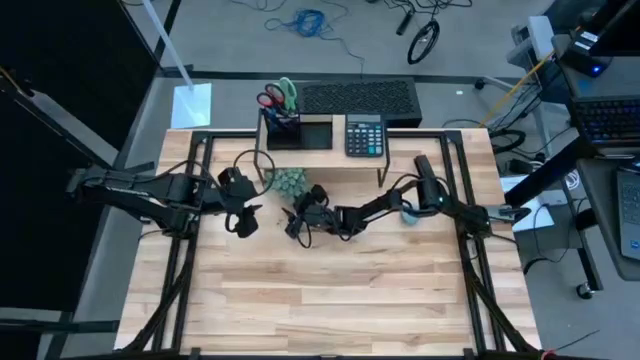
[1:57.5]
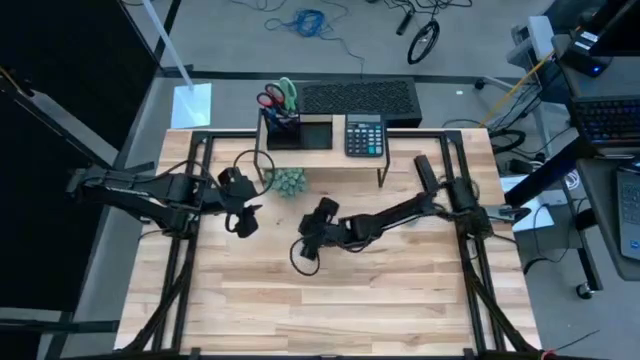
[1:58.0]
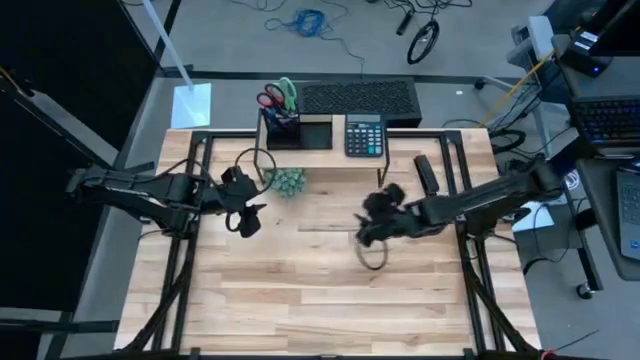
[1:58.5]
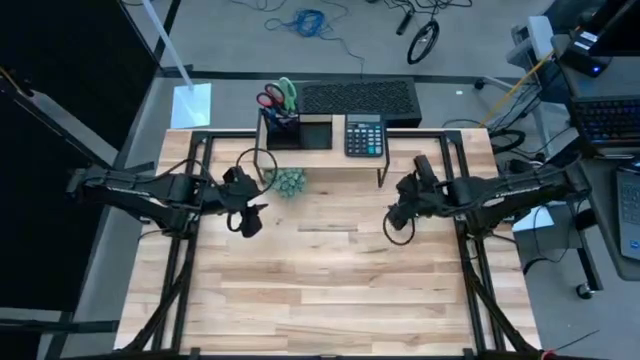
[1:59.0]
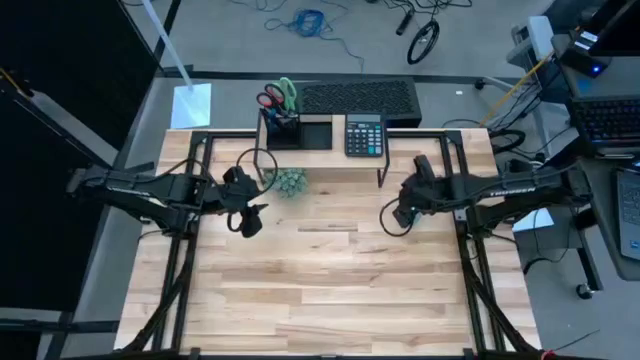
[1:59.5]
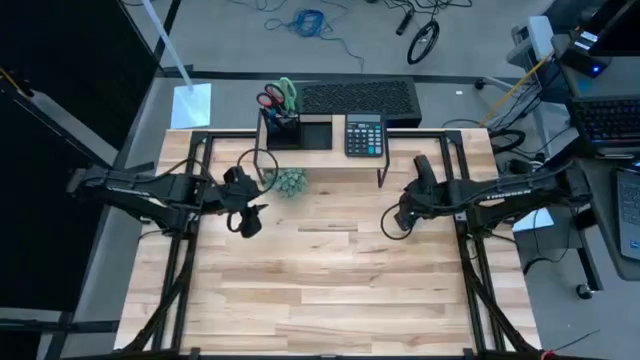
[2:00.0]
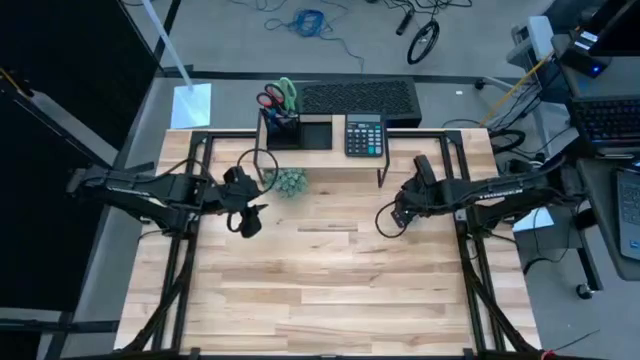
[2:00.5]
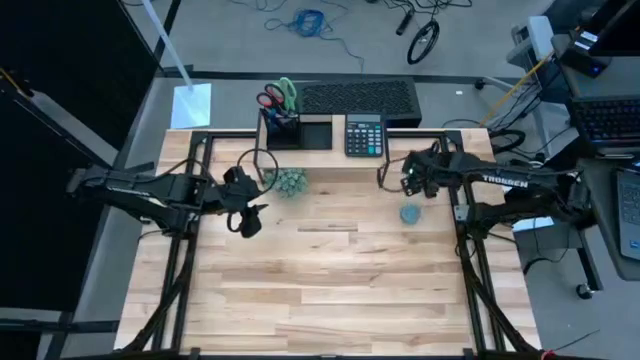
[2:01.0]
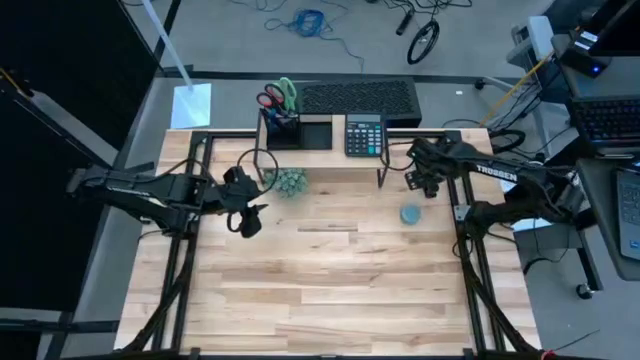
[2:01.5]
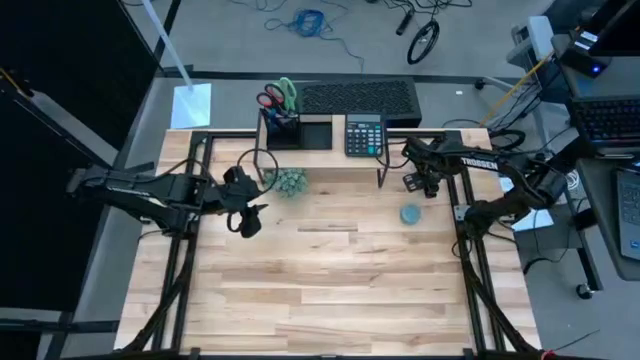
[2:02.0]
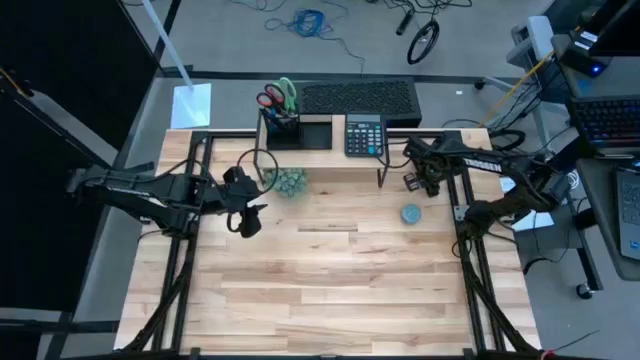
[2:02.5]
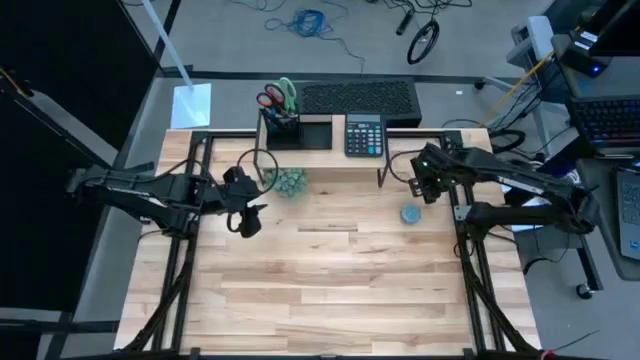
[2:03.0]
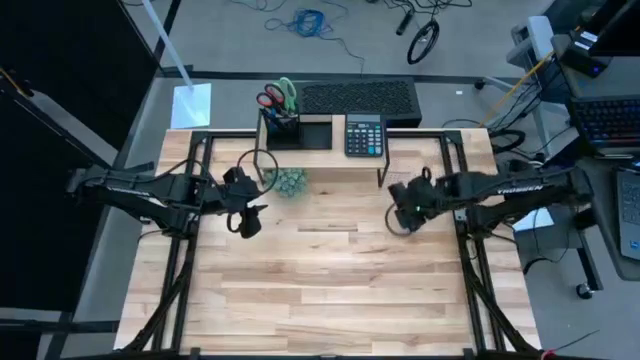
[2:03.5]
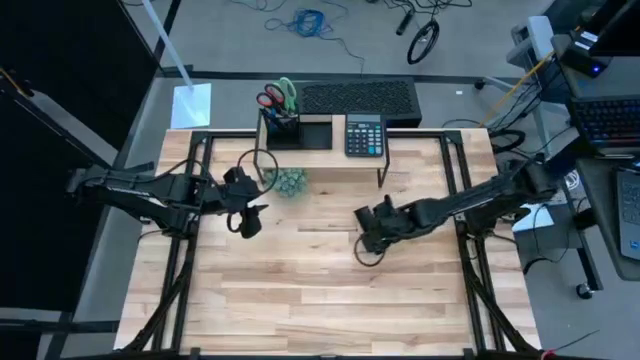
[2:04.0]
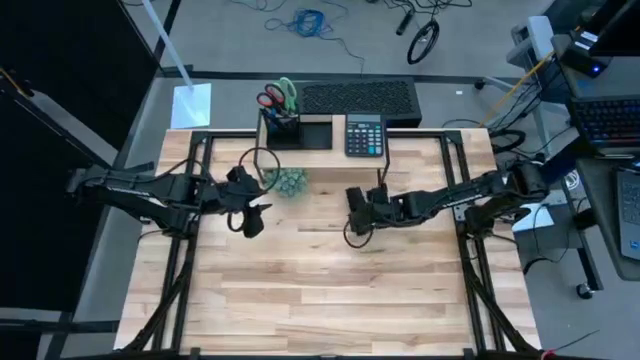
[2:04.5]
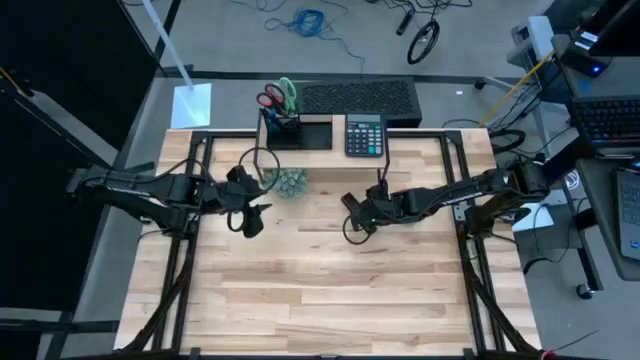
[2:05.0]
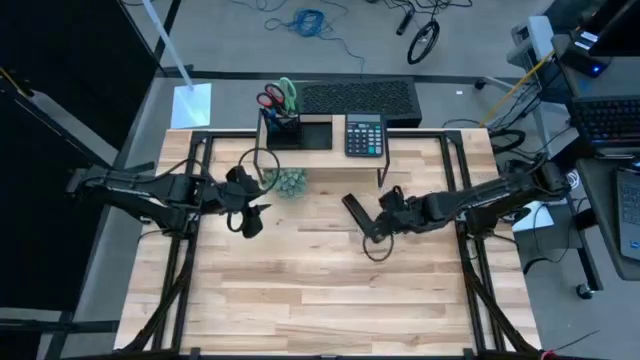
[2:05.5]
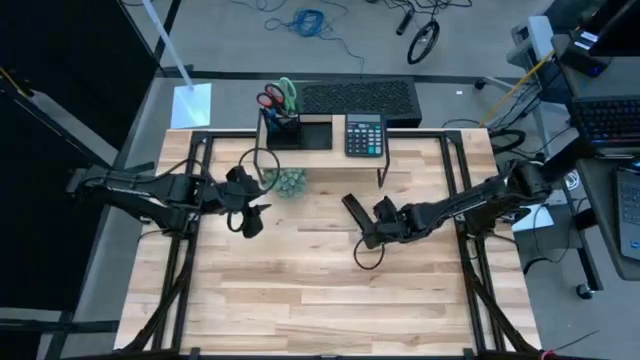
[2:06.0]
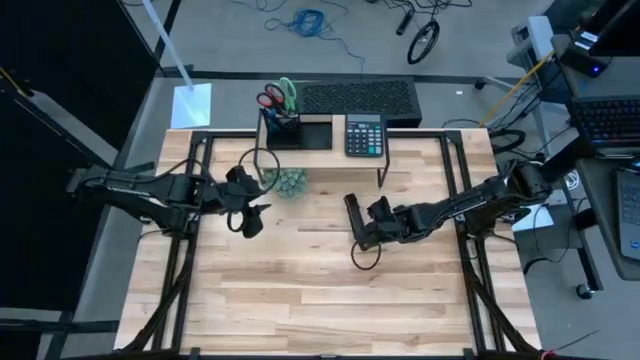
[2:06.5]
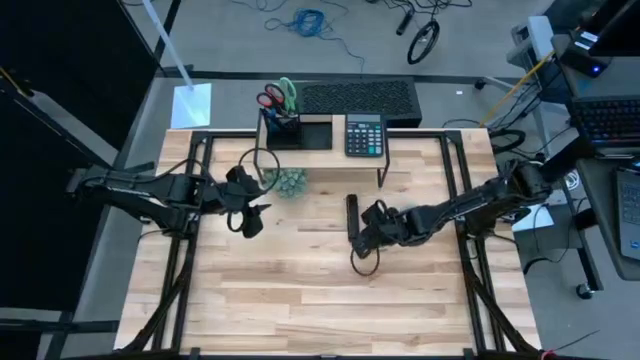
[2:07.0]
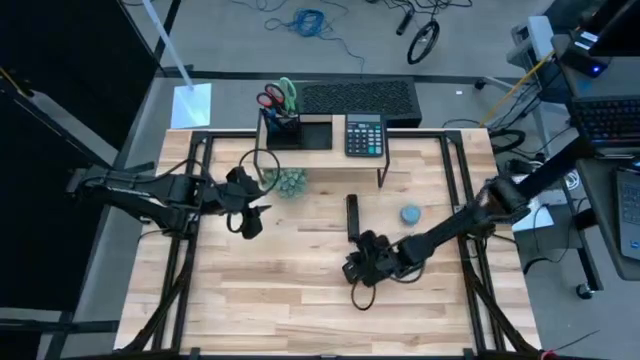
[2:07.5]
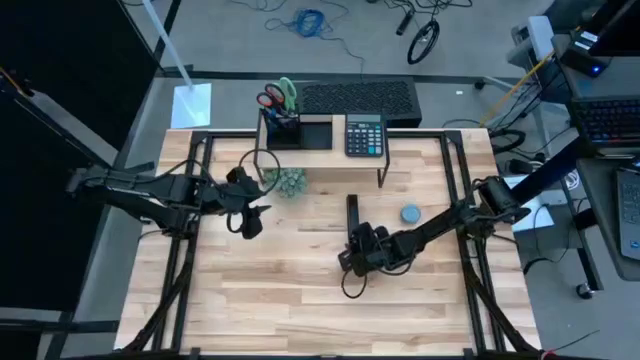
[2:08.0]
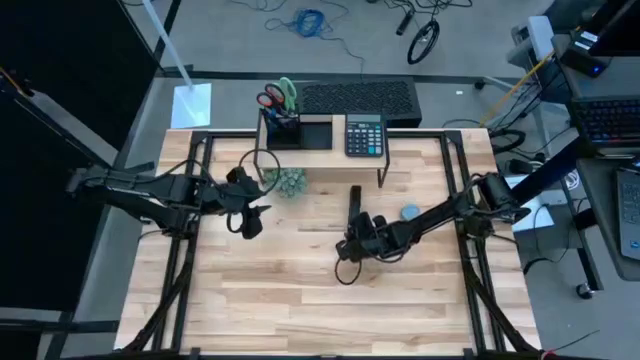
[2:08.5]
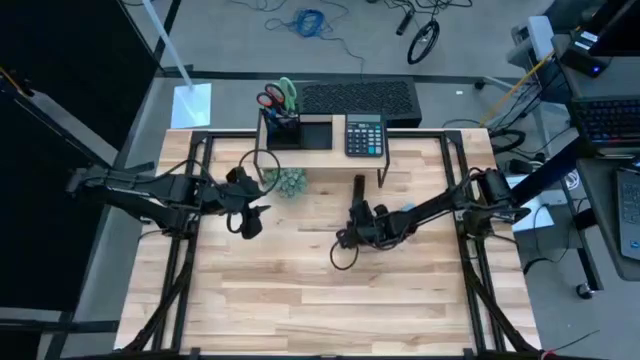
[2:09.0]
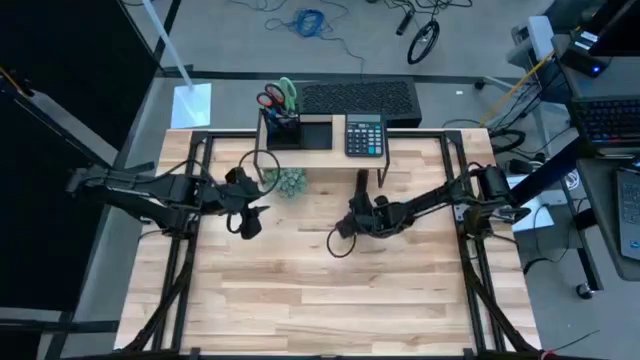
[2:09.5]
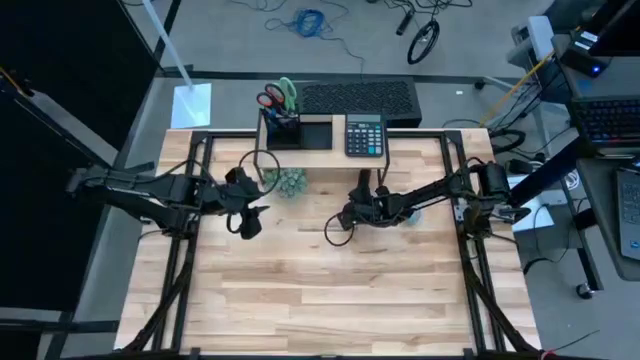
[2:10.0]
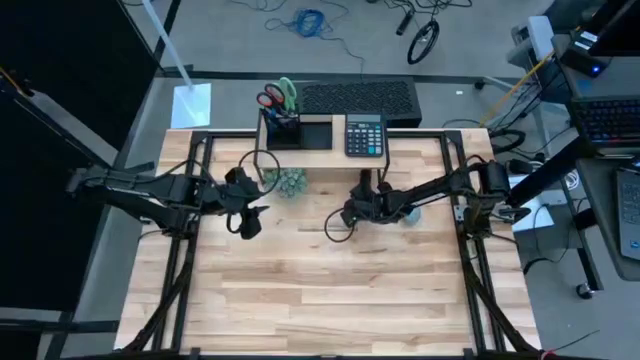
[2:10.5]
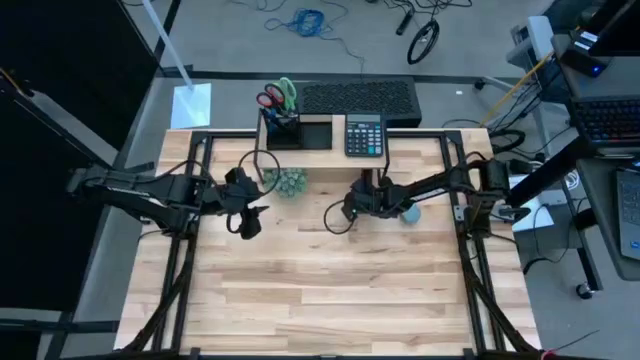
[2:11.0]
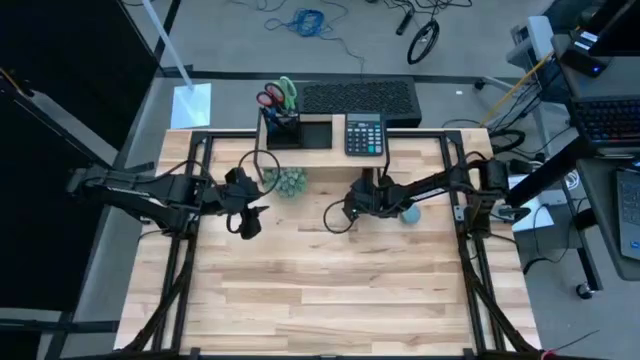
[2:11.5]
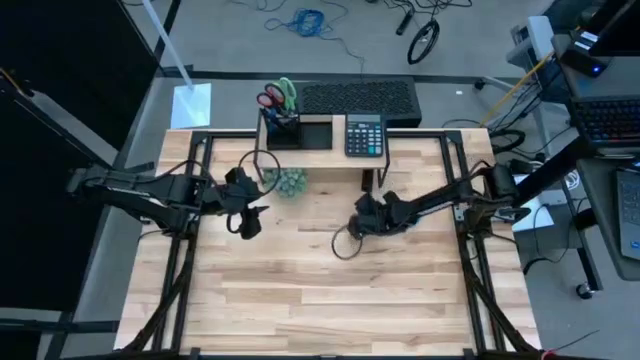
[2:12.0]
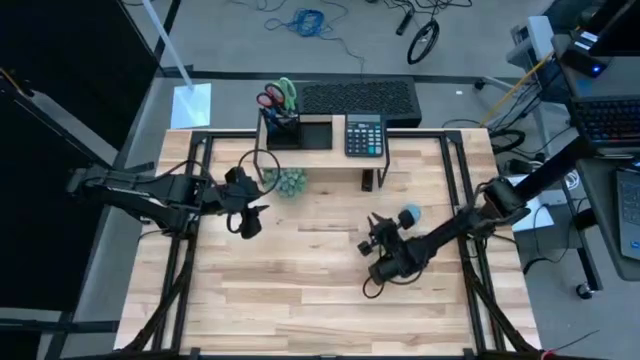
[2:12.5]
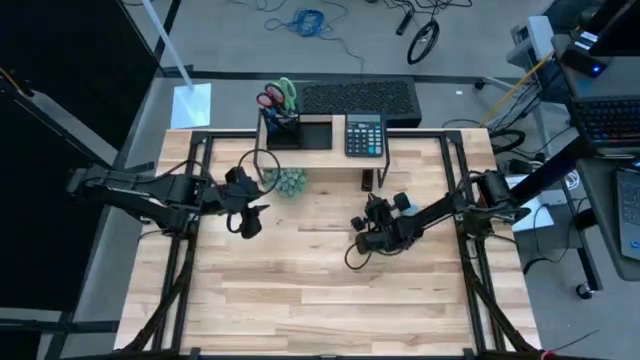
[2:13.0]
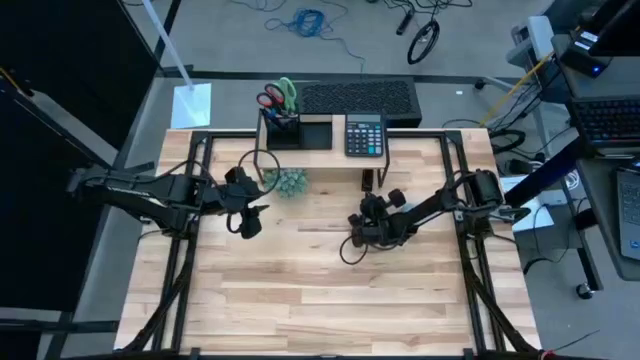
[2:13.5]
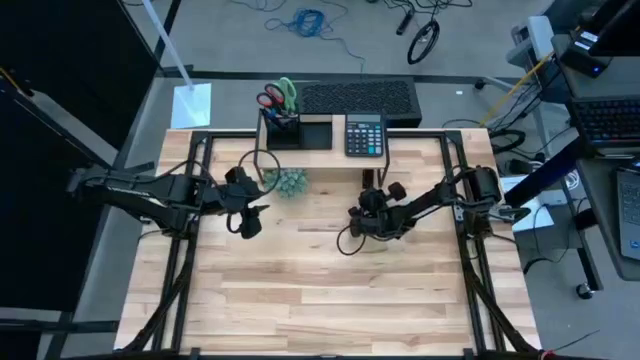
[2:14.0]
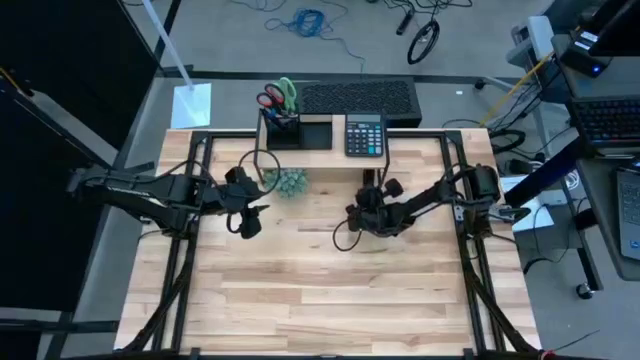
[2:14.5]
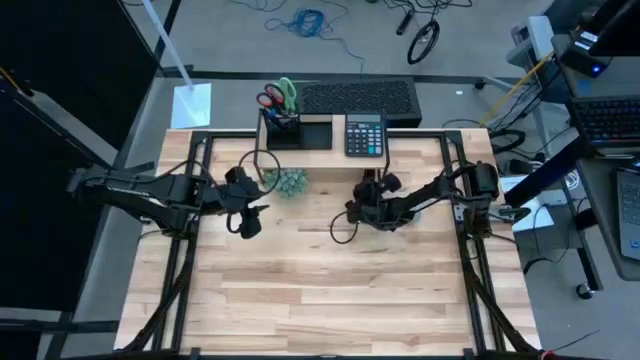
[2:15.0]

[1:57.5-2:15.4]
Task: Pick and place office supplies into organizer
Move the black stapler under the shelf

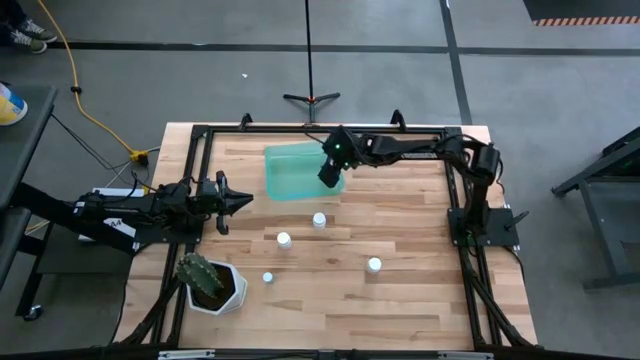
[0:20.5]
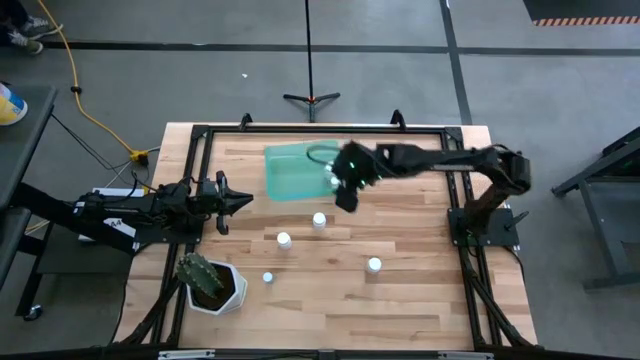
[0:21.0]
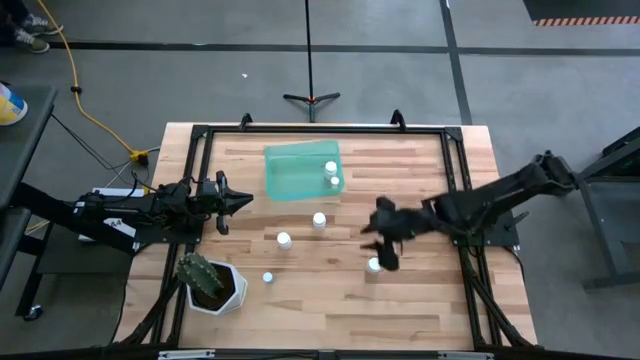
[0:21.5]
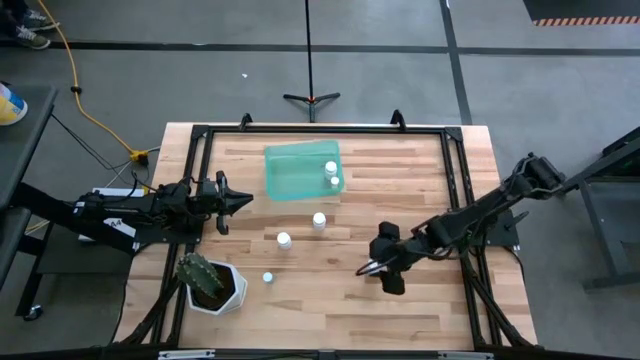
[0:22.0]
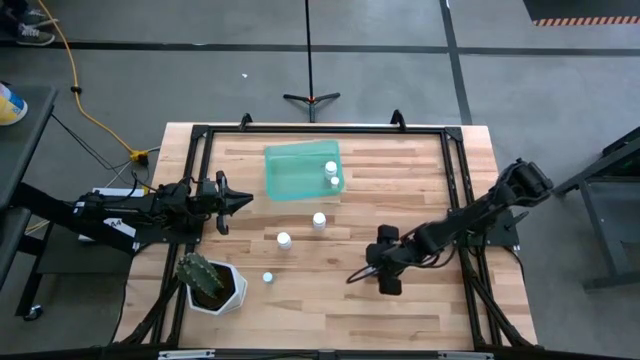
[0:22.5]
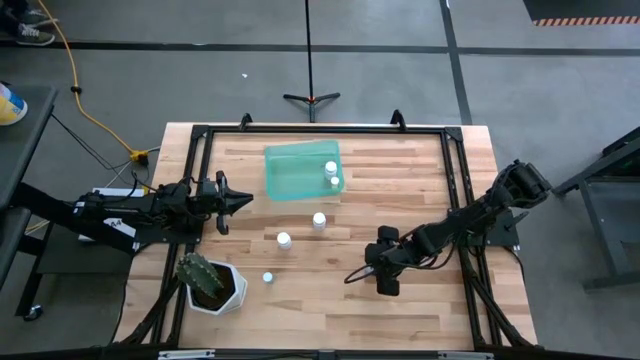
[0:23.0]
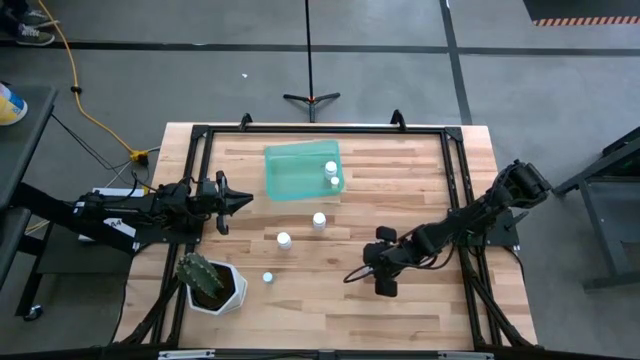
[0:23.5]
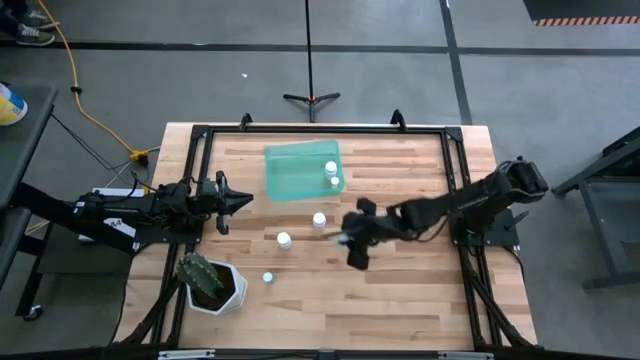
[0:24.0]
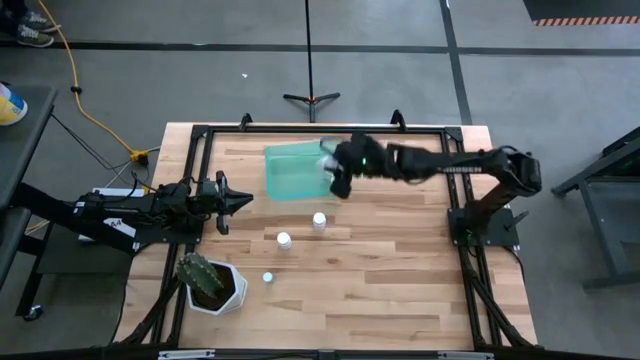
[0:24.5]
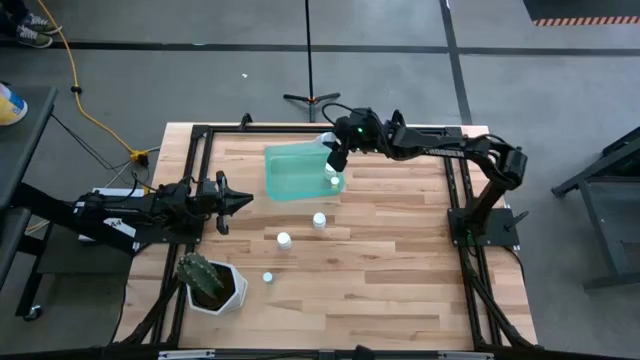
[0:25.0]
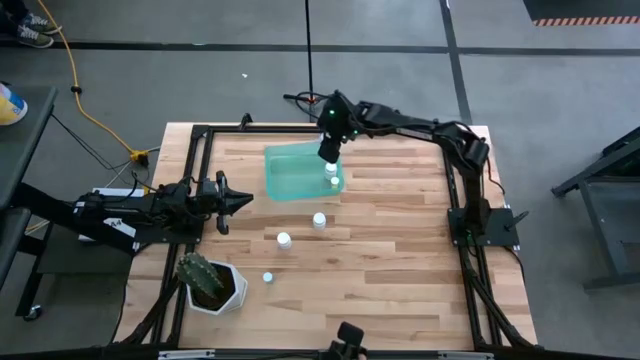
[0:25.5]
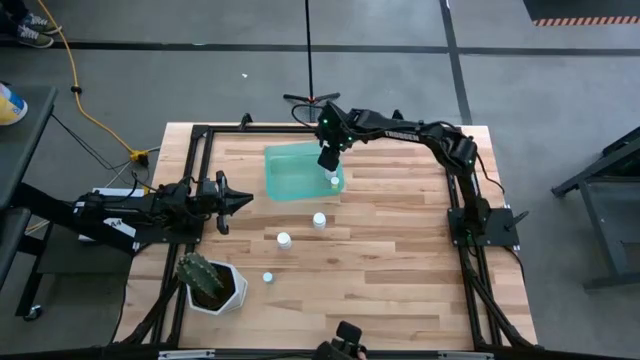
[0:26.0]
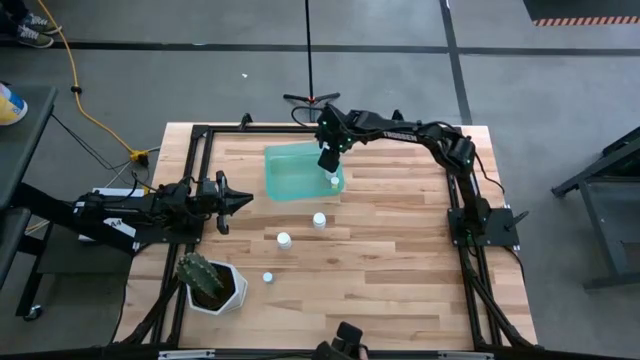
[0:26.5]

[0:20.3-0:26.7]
Task: Pick and place pill bottles into a basket
Put the white pill bottle into the green bin
